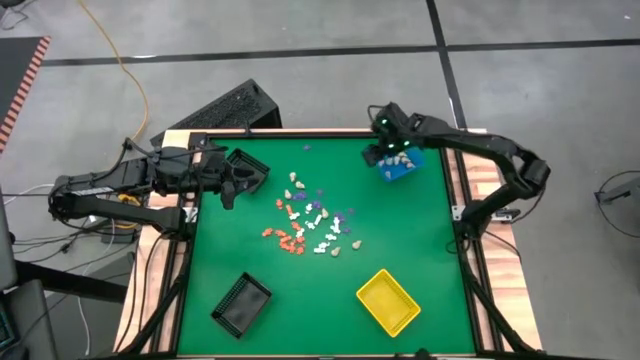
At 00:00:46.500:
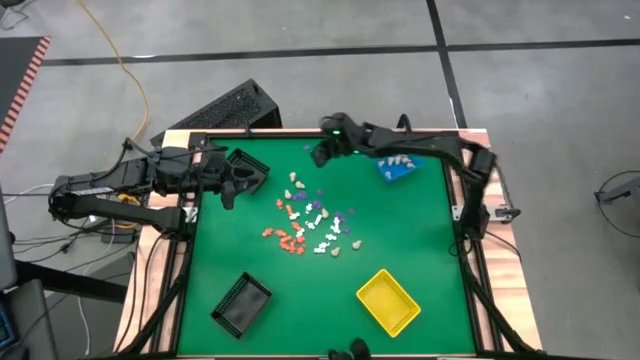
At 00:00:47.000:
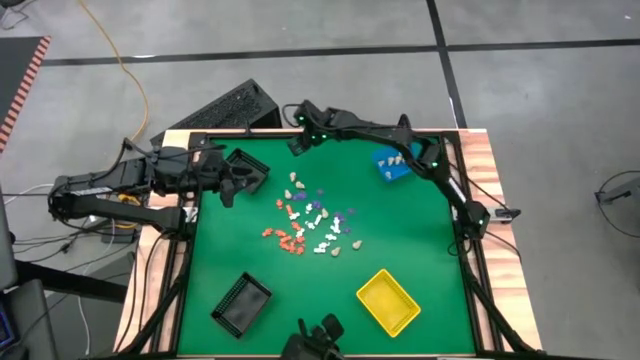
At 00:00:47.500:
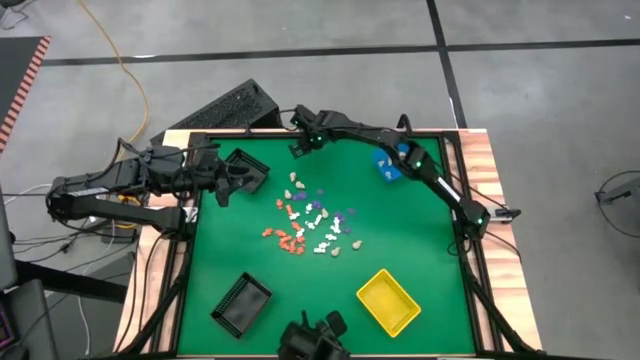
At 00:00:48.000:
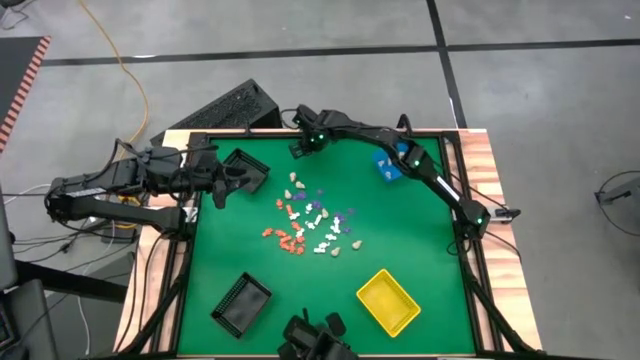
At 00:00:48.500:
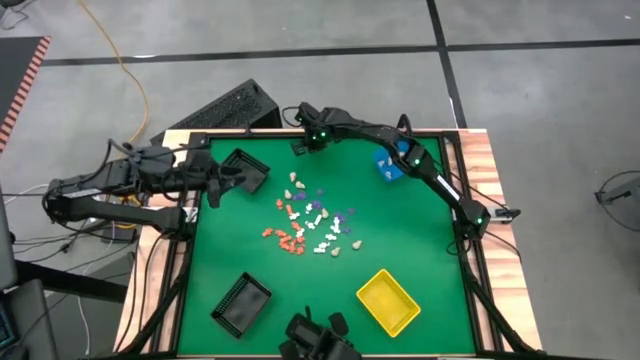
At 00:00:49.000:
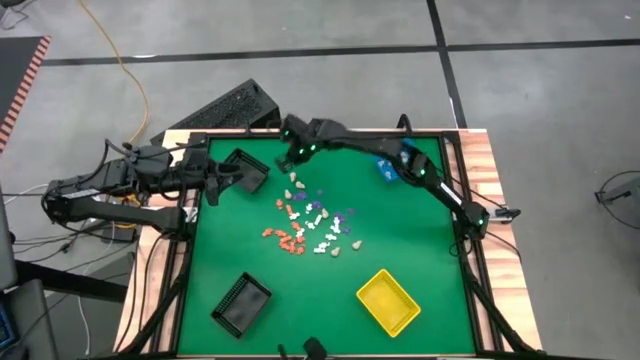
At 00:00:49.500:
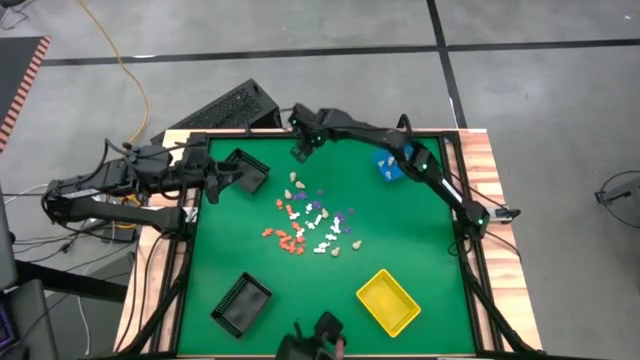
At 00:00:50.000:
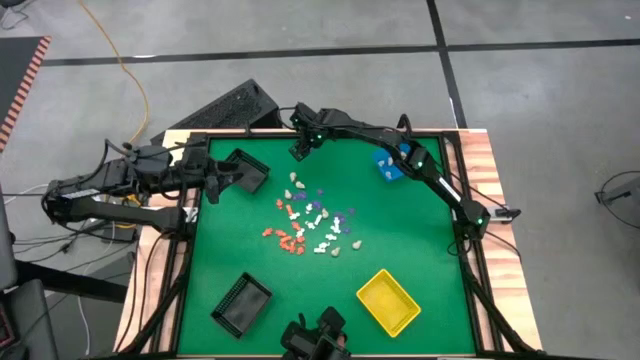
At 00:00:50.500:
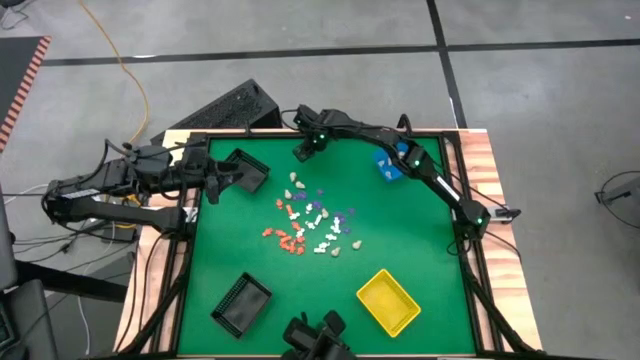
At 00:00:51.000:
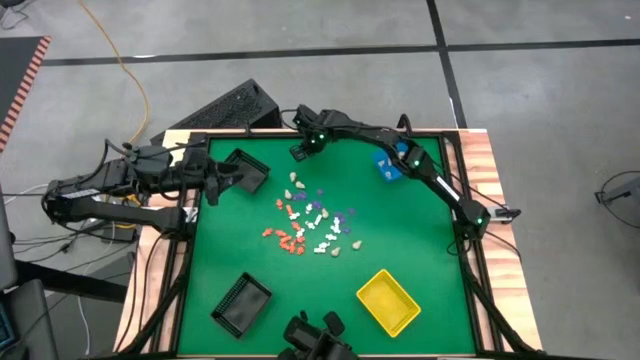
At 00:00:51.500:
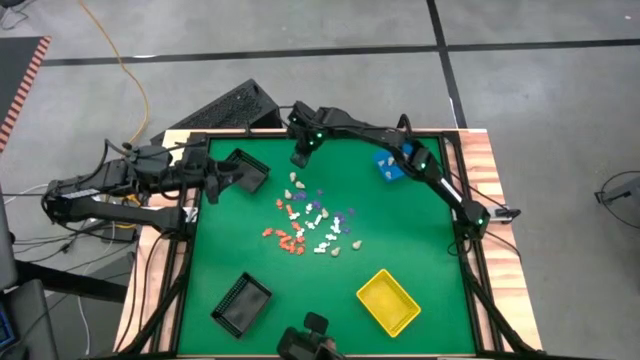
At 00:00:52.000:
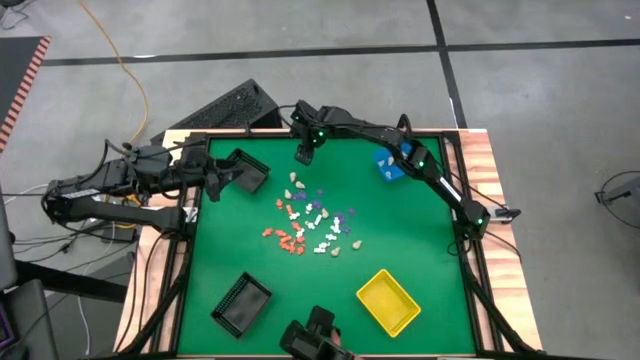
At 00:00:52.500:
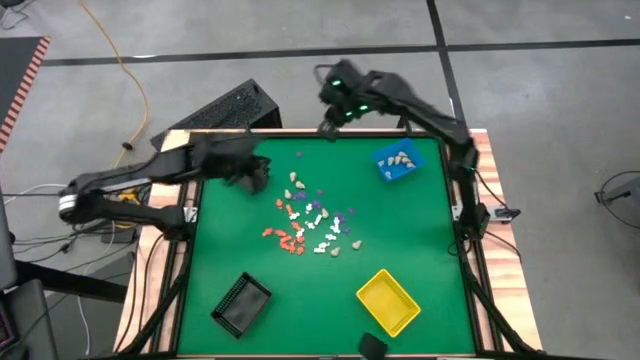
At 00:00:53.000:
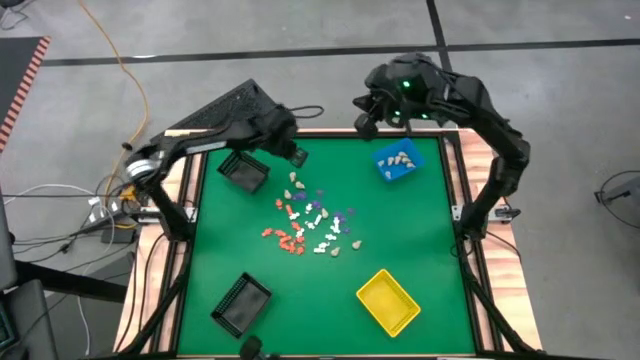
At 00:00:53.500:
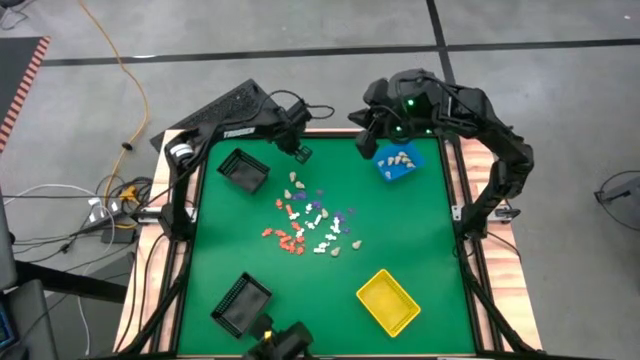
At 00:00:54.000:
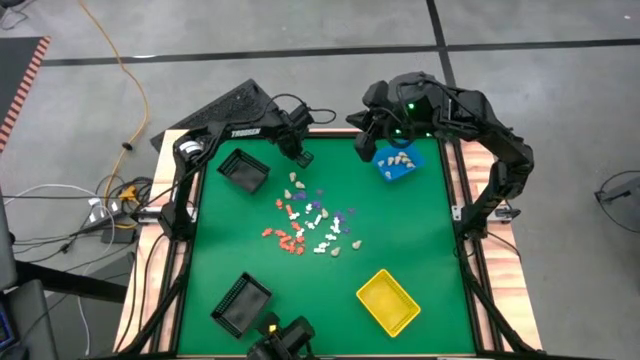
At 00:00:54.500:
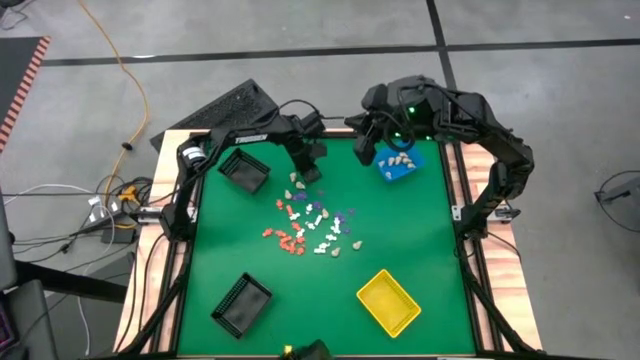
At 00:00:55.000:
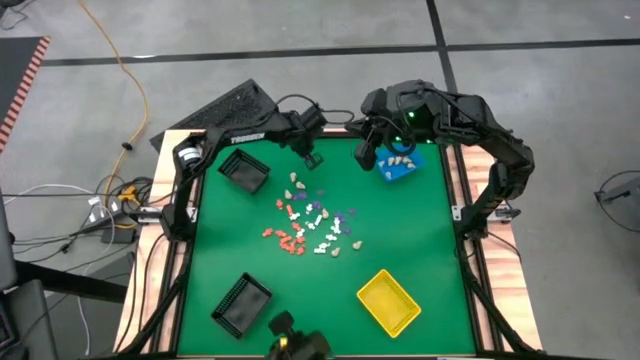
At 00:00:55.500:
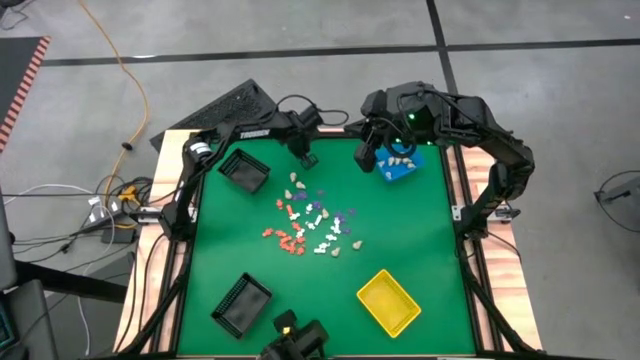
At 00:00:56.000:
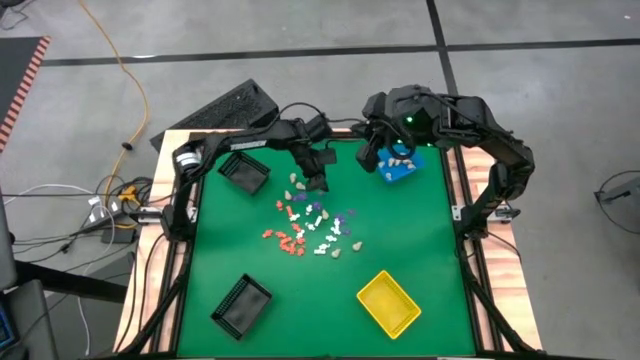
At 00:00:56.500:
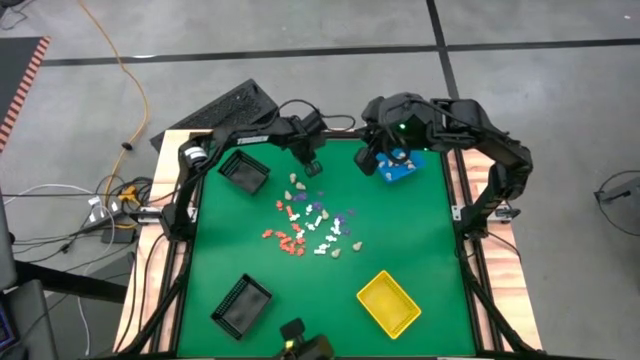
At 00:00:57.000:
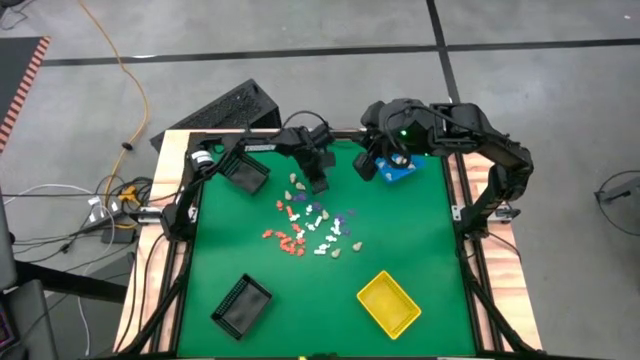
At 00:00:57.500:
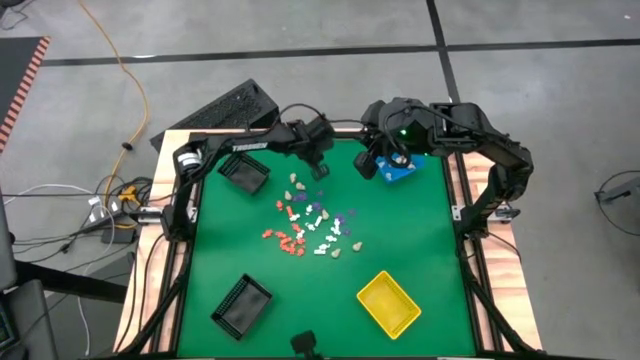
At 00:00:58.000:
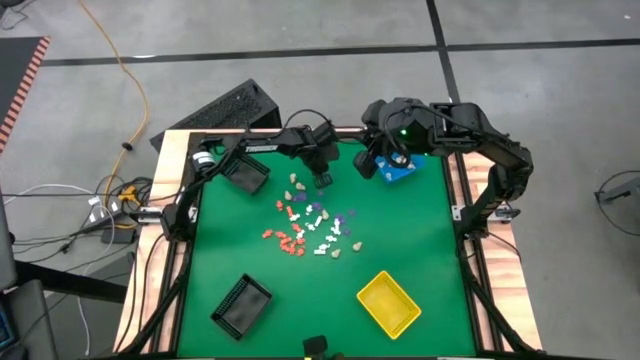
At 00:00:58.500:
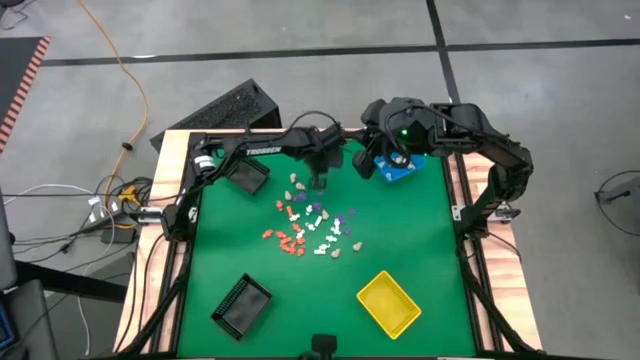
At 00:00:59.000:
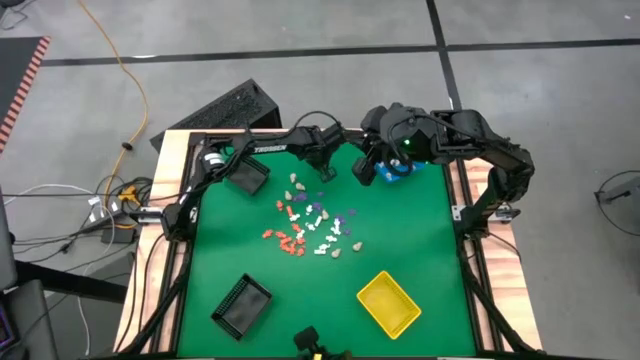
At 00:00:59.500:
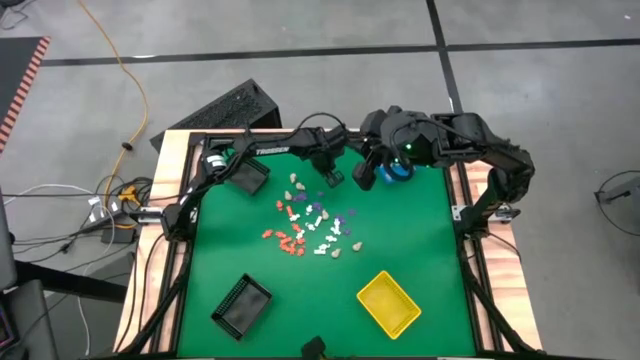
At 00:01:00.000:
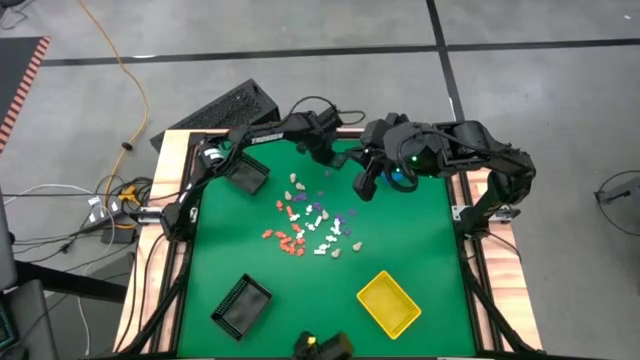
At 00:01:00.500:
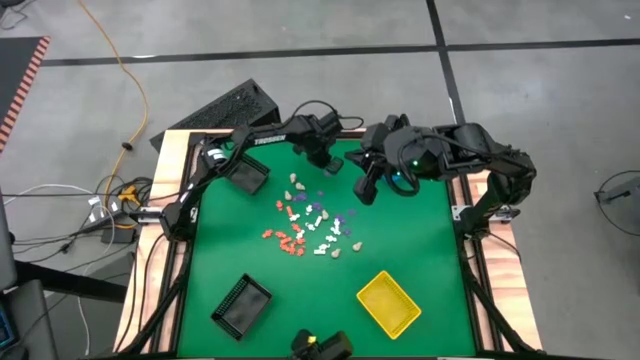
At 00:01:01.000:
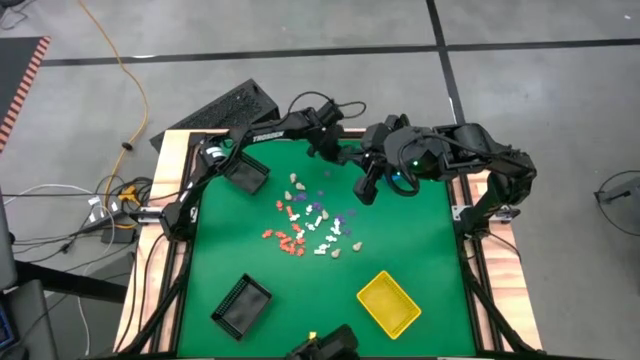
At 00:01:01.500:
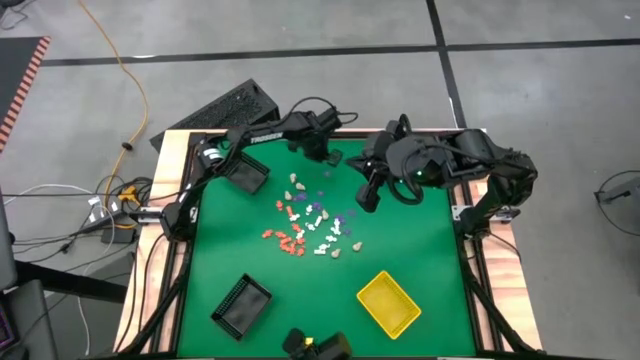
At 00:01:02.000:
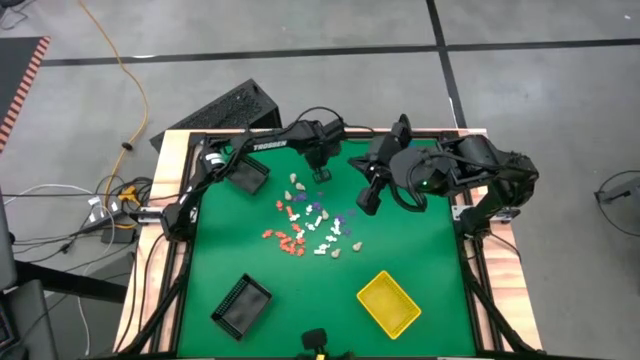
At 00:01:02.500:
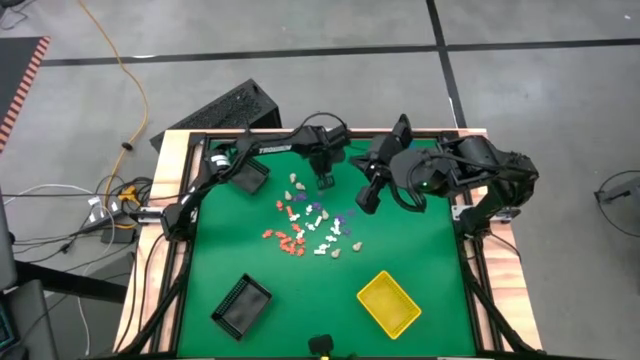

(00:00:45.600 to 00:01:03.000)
Task: Sort Halloween decoration
Put the purple spider toy into the top black basket

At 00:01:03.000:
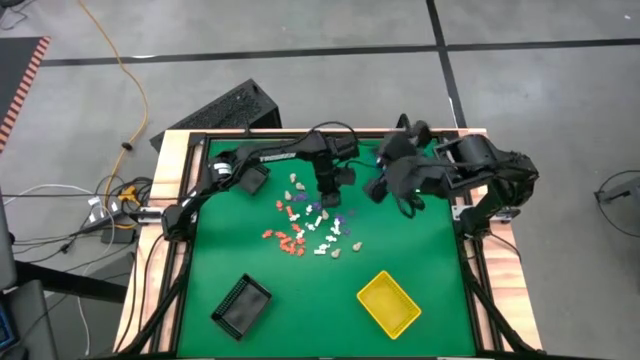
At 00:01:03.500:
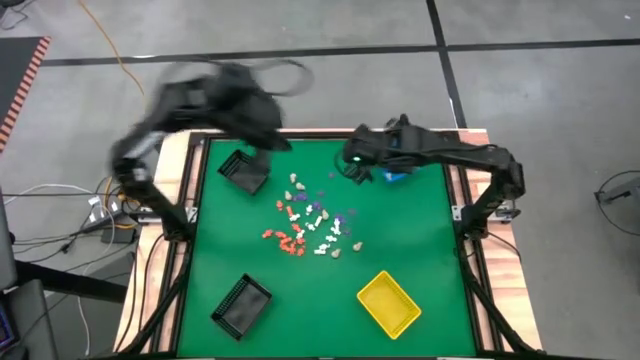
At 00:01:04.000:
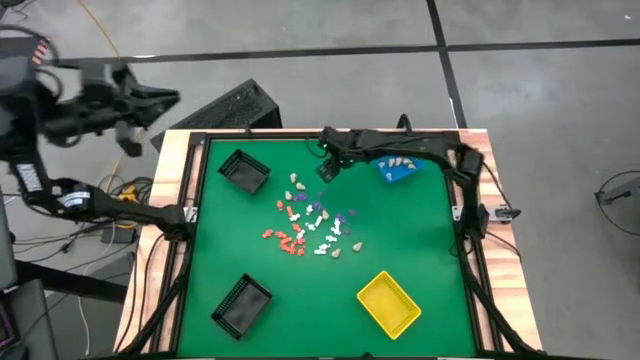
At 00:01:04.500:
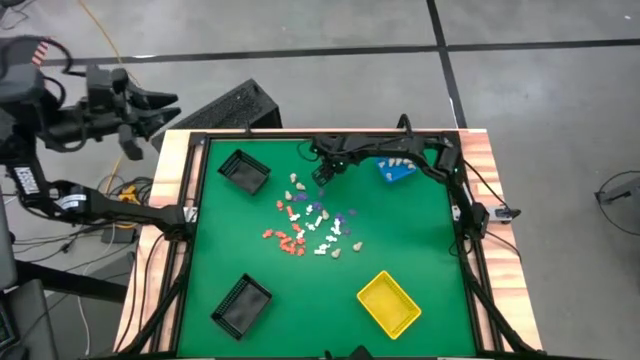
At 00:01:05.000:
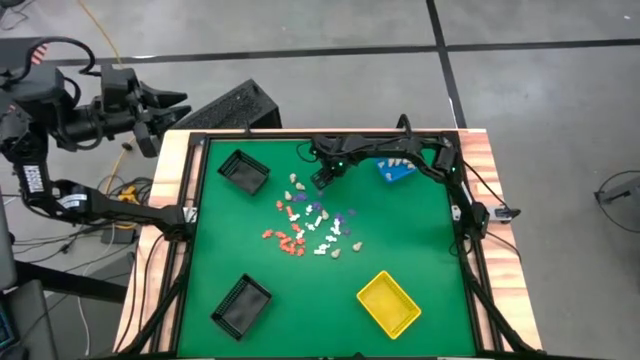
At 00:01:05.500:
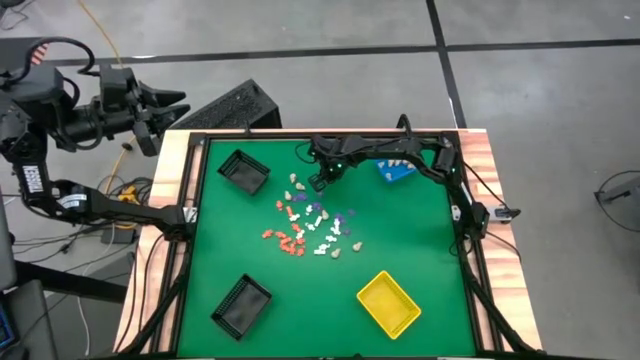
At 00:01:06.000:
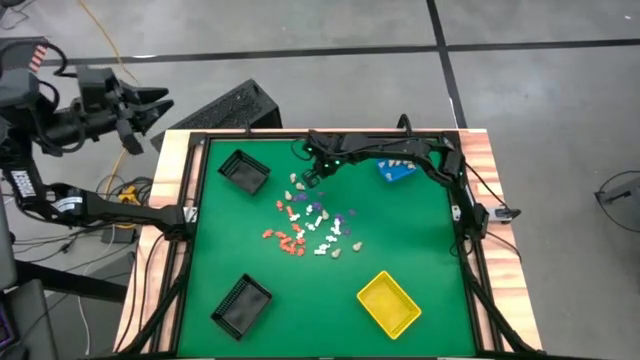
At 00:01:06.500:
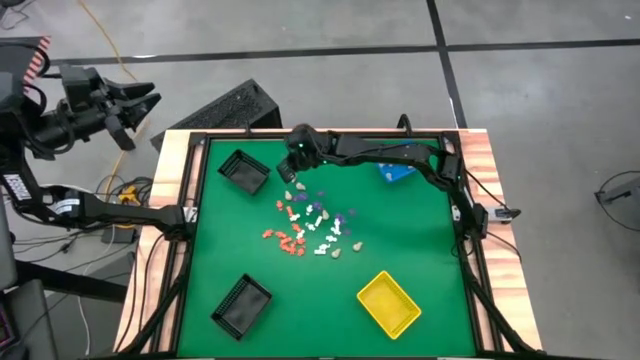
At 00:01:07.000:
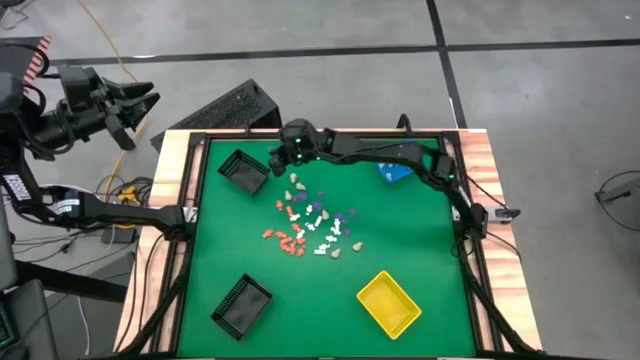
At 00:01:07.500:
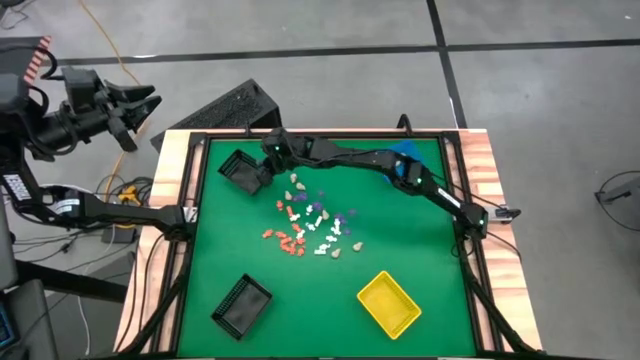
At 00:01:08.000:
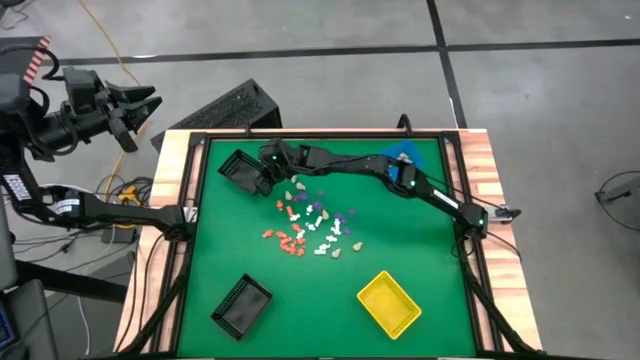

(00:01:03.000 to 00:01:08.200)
Put the purple spider toy into the top black basket
